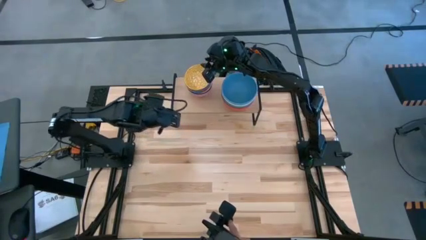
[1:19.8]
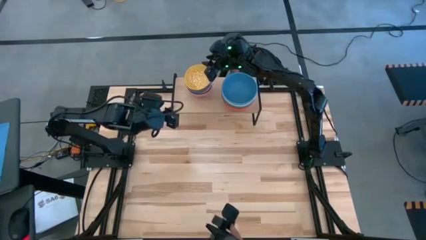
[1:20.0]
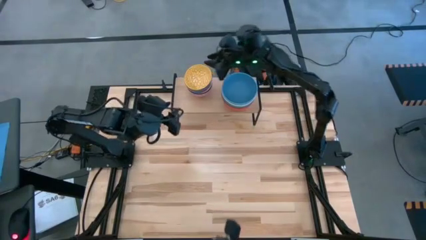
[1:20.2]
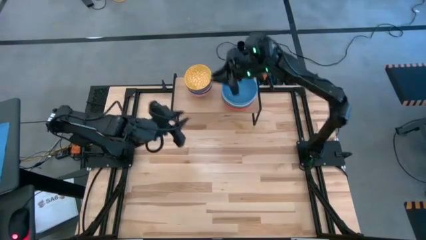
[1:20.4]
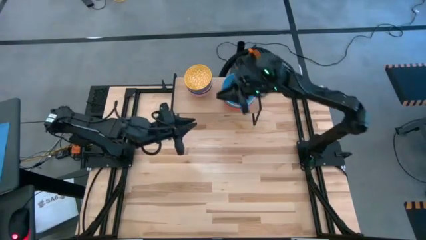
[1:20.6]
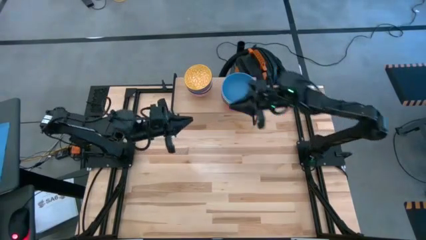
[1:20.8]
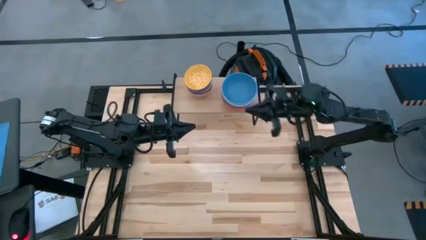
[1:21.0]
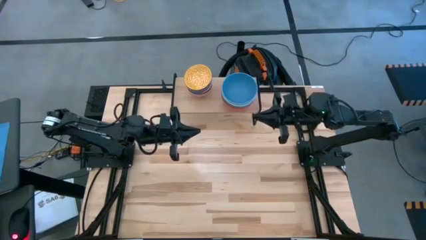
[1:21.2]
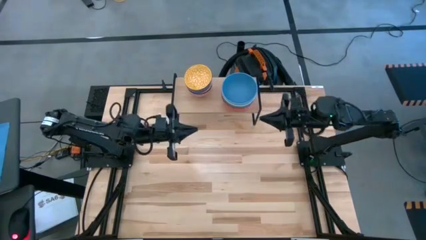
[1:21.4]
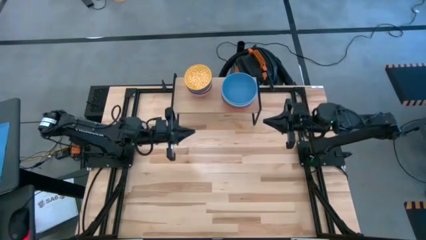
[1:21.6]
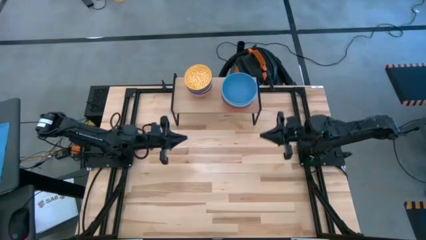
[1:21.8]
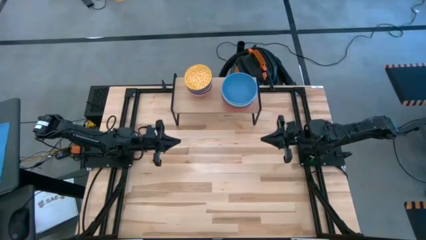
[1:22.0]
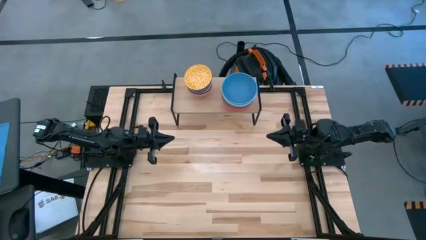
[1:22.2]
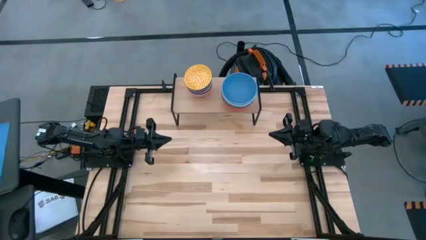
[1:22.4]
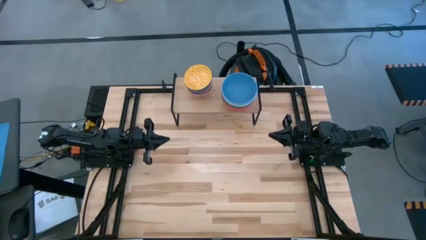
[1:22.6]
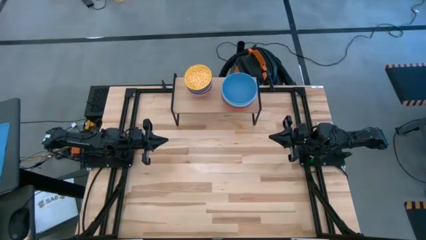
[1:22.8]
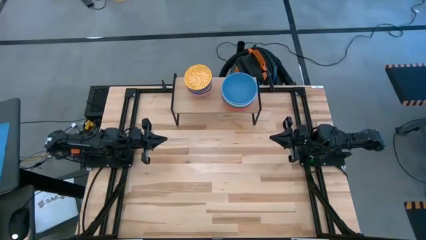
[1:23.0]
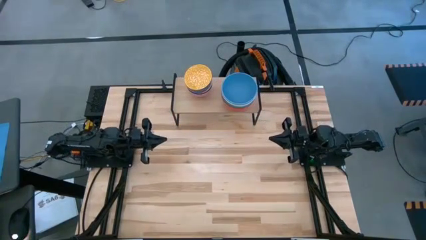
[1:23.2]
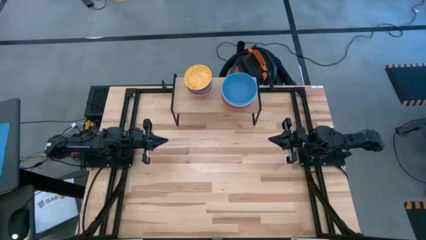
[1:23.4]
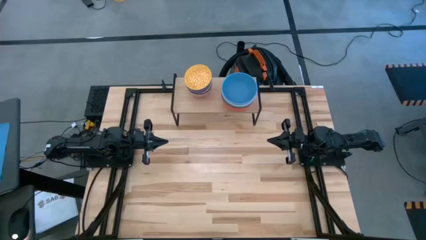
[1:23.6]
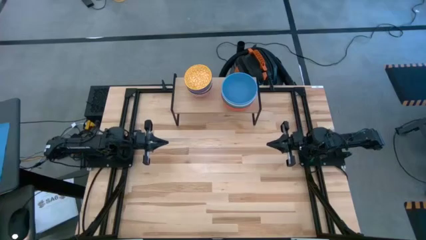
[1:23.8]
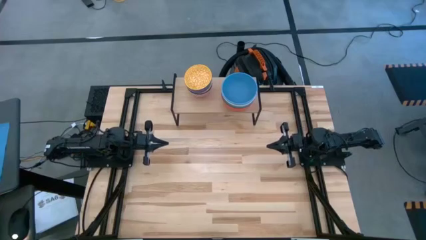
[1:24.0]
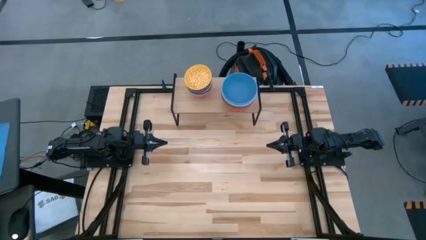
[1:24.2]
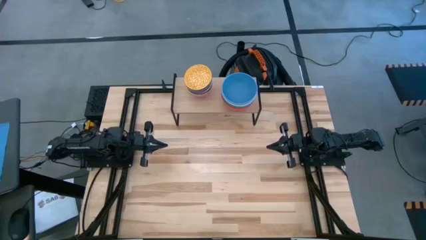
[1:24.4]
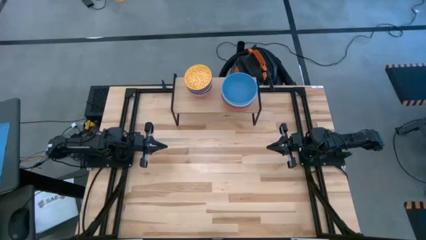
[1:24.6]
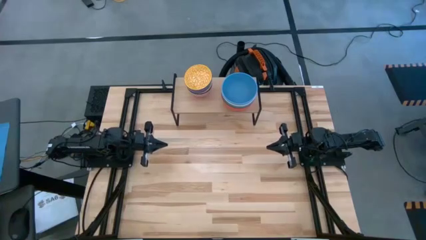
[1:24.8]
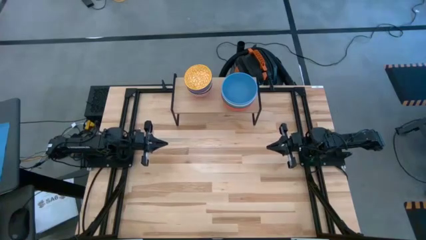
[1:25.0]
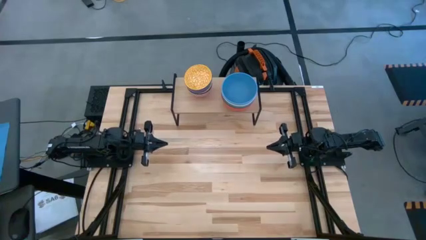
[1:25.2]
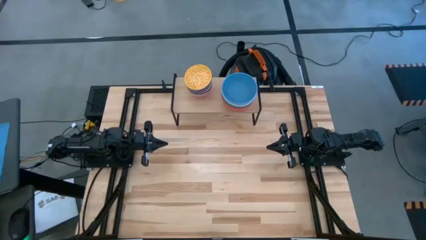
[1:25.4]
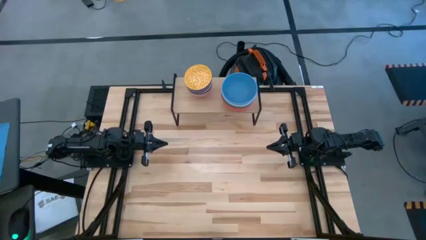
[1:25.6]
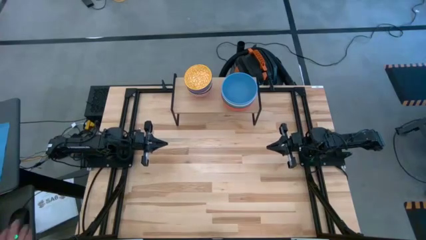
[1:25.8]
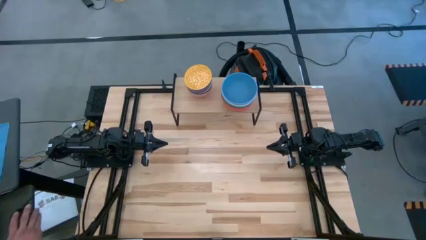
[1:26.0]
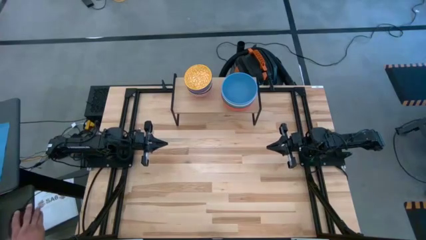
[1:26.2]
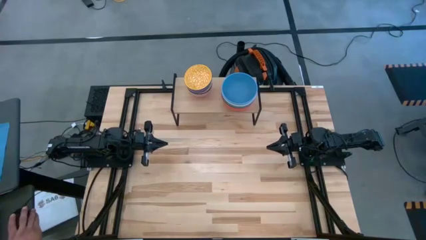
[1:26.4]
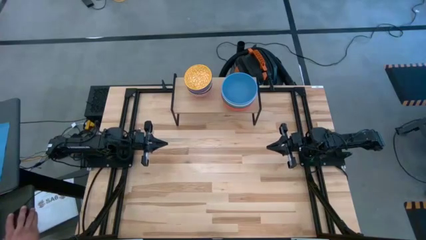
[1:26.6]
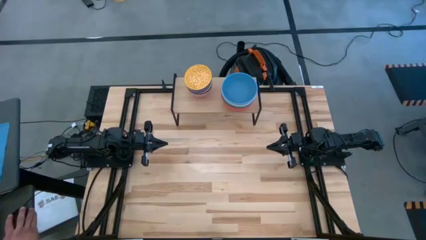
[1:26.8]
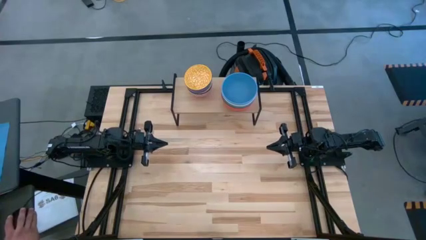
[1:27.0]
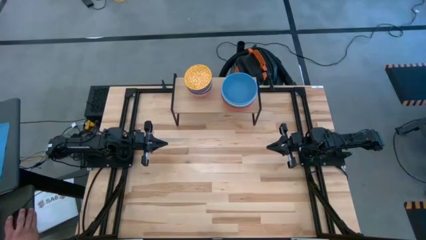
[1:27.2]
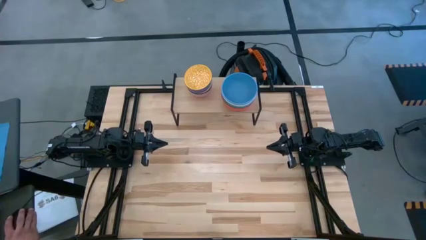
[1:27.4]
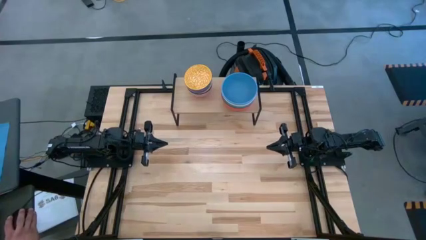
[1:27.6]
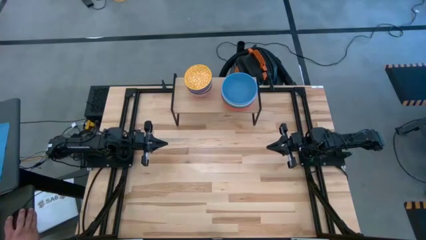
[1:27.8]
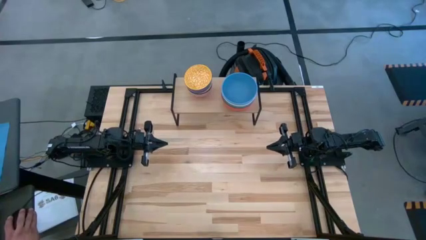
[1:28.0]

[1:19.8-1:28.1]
Task: Place and stack bowls onto a shelf
Return to Home Position

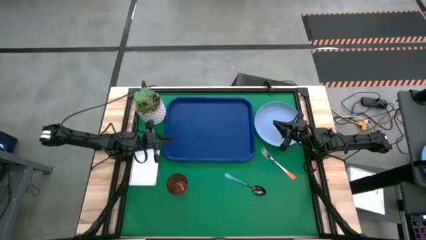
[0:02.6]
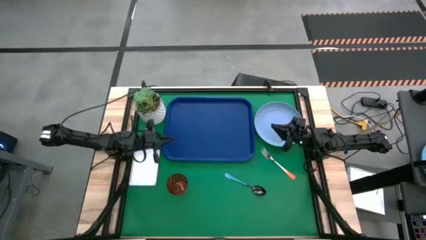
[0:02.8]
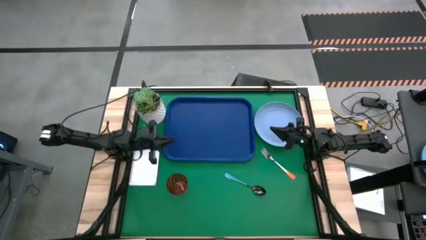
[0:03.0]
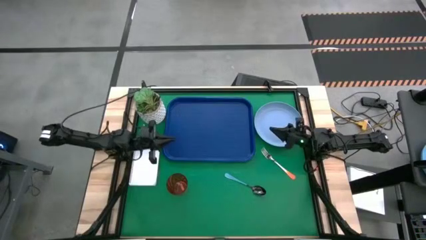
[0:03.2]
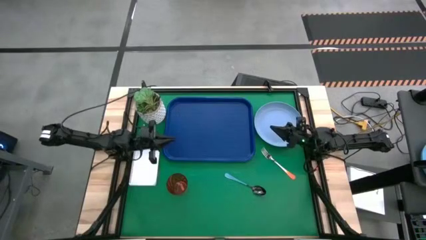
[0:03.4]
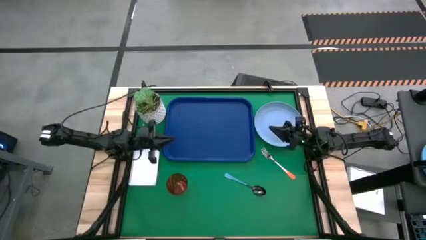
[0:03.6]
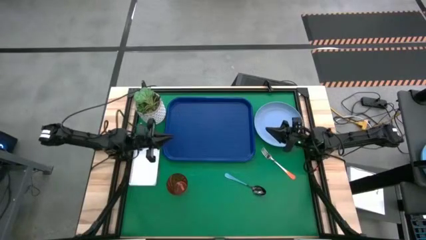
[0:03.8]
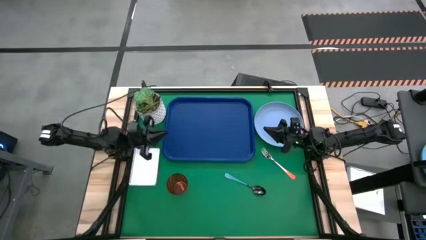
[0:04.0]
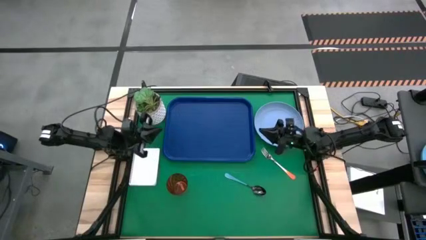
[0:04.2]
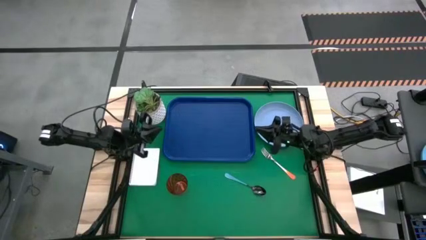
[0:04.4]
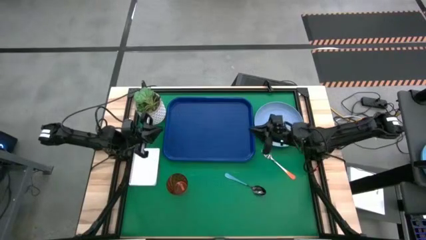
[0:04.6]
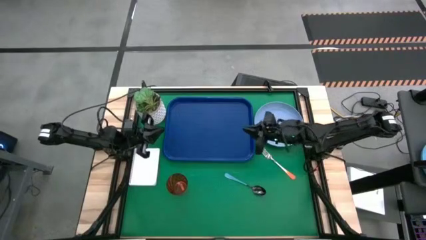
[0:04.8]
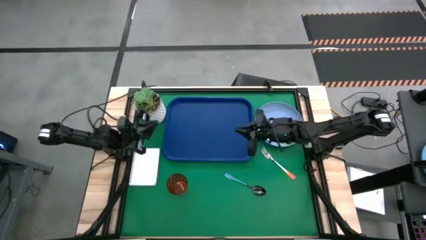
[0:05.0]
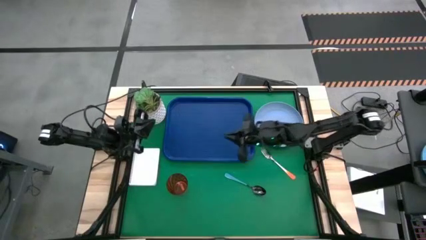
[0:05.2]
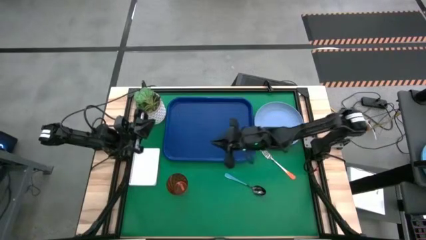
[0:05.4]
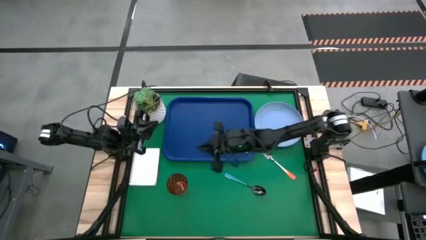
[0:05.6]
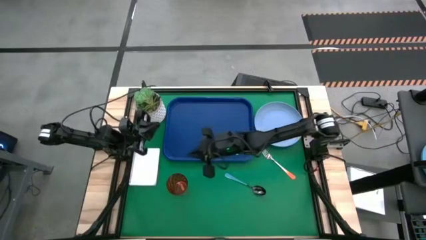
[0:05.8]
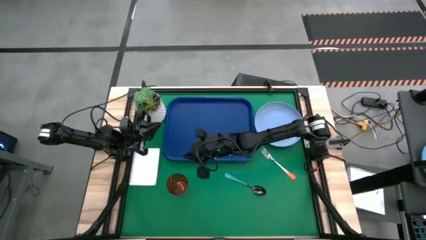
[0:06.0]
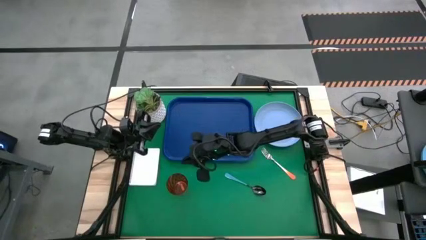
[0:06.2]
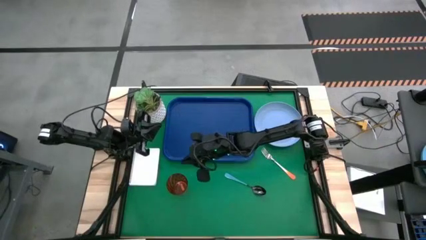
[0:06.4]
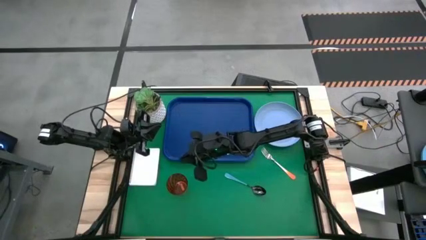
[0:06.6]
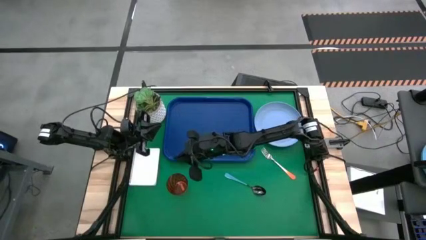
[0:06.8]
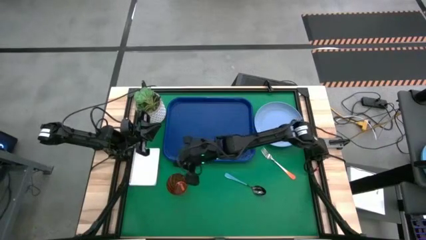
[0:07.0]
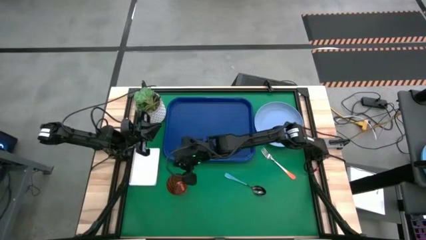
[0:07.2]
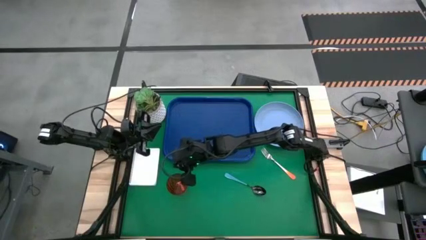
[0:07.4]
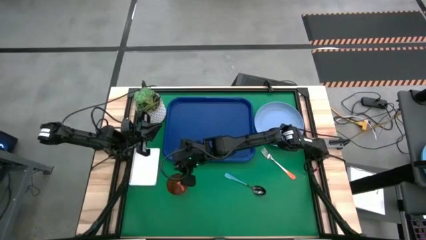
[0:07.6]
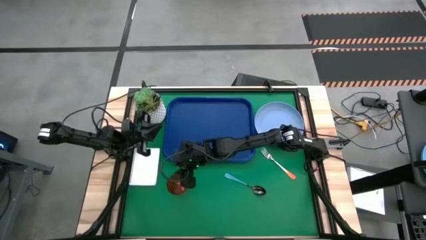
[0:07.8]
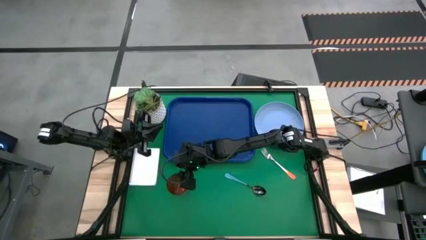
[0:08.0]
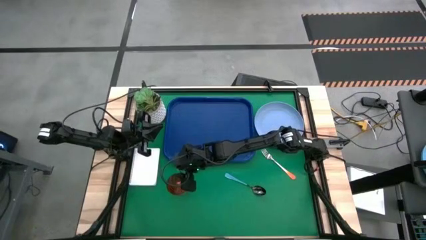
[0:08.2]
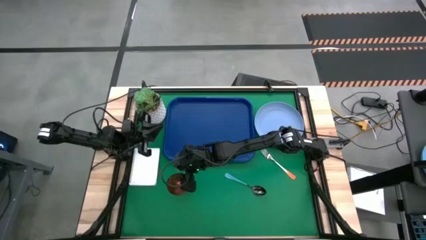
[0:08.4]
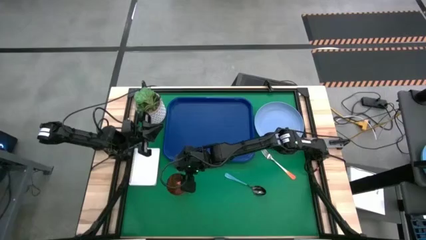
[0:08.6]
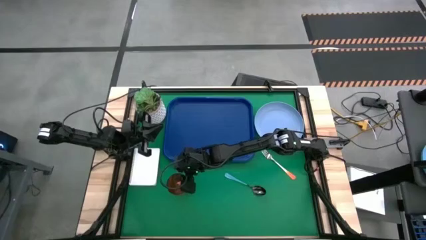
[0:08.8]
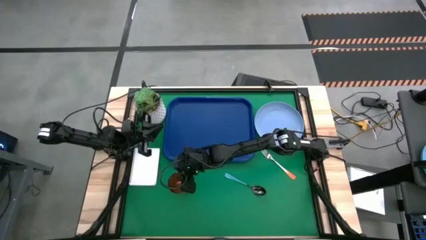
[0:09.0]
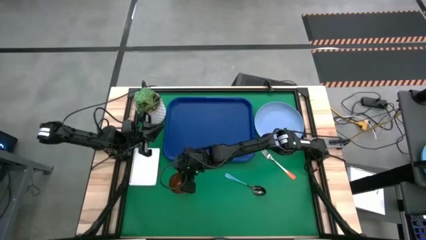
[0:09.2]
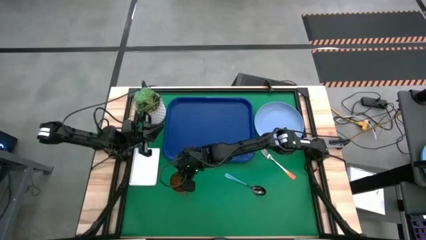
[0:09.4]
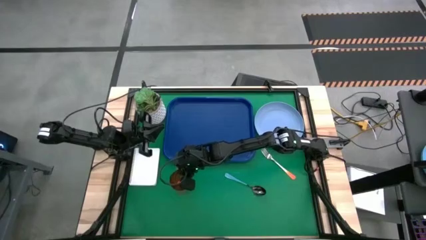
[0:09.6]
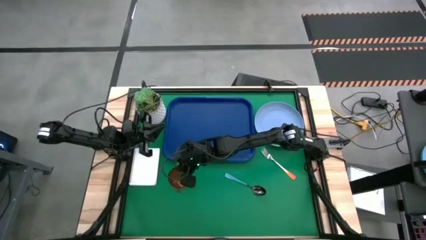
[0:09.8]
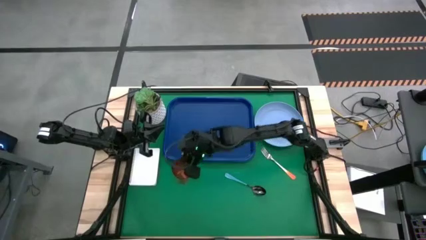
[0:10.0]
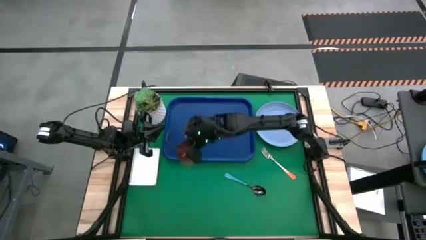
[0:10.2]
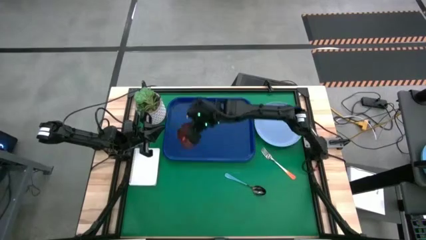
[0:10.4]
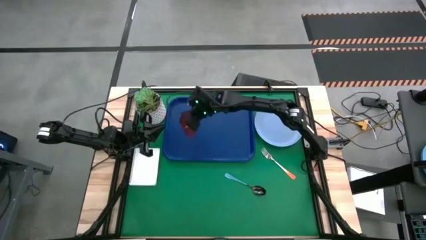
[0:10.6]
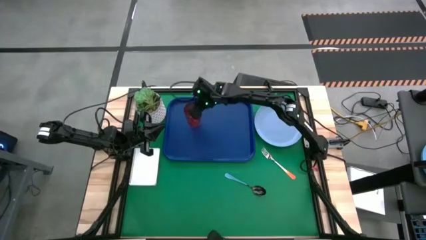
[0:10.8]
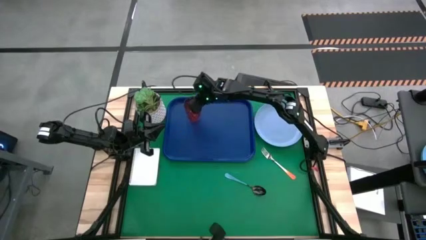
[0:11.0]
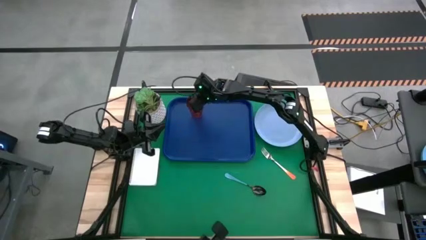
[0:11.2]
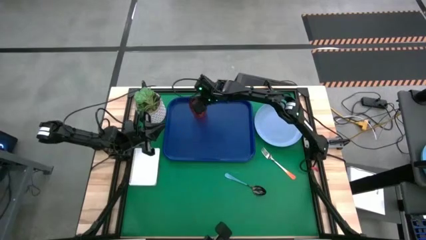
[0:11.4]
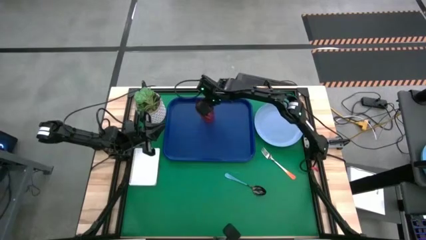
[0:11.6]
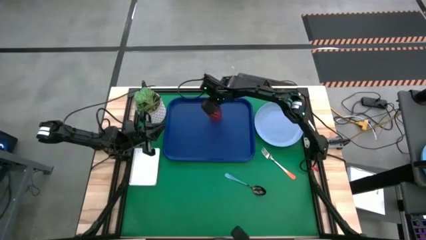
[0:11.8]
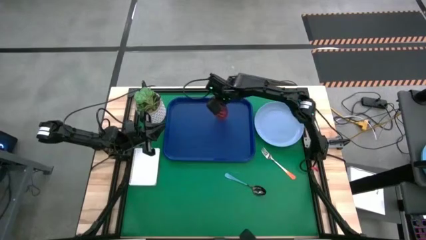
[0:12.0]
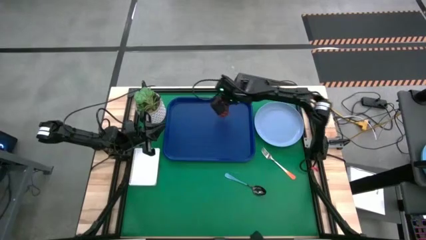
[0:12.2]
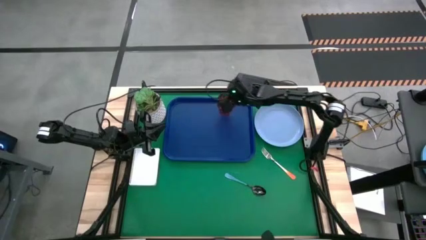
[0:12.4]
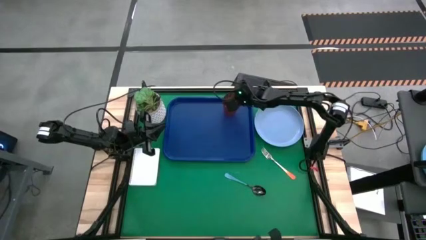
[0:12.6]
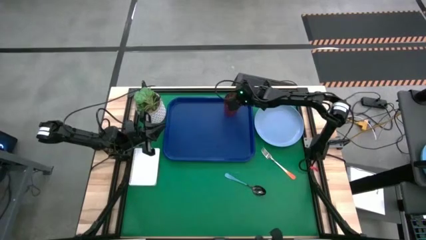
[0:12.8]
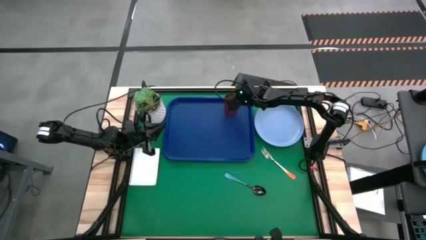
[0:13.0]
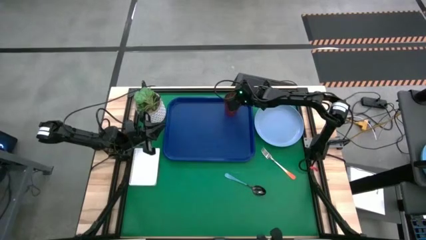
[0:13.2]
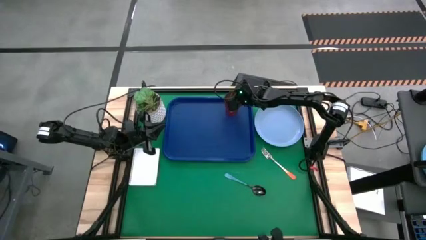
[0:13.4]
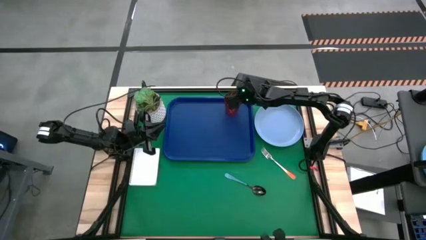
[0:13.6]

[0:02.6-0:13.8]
Task: Pick and place plate/cup/fork/spoon on tray
Put the brown cup on the blue serving tray
